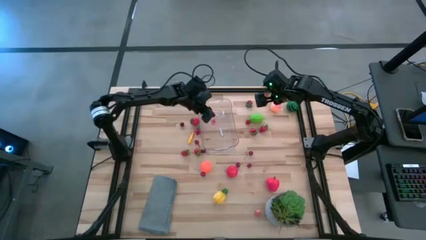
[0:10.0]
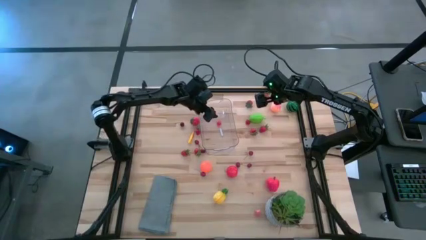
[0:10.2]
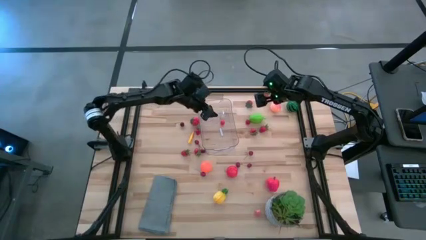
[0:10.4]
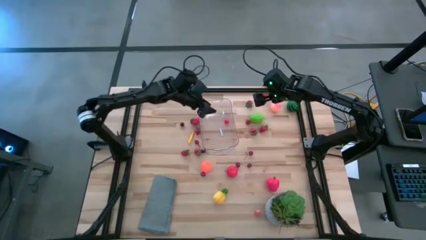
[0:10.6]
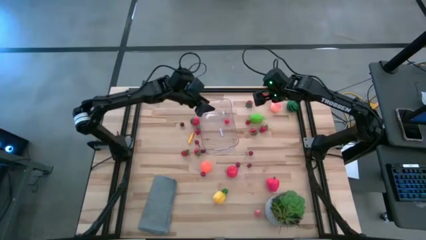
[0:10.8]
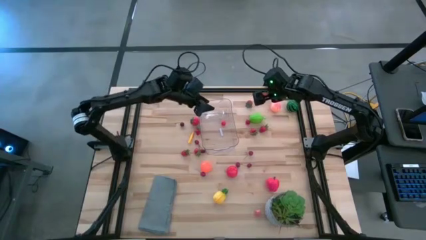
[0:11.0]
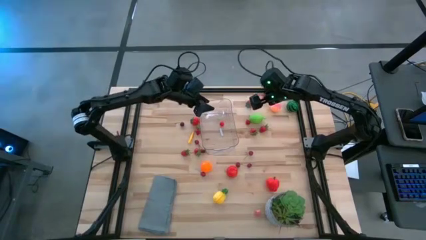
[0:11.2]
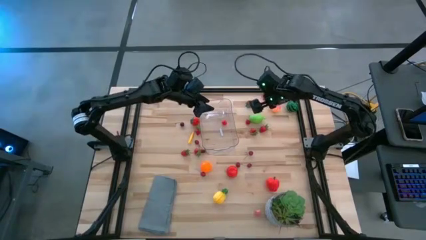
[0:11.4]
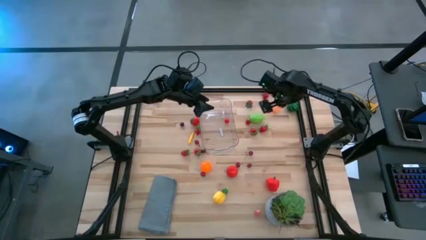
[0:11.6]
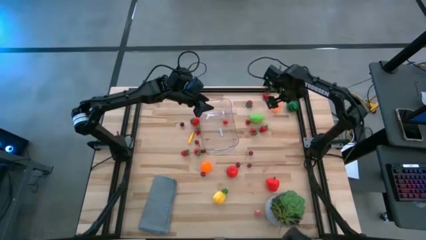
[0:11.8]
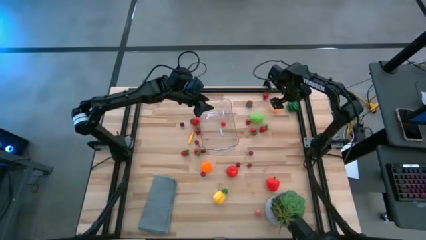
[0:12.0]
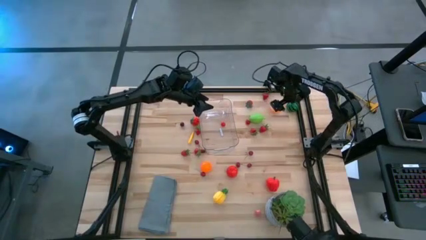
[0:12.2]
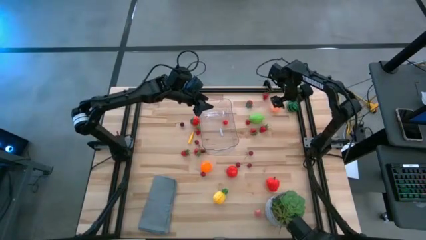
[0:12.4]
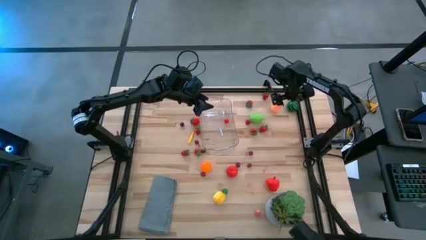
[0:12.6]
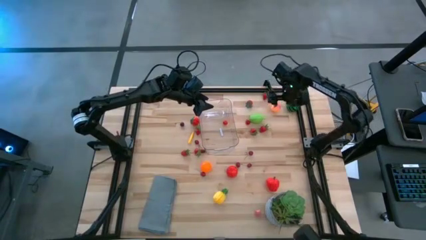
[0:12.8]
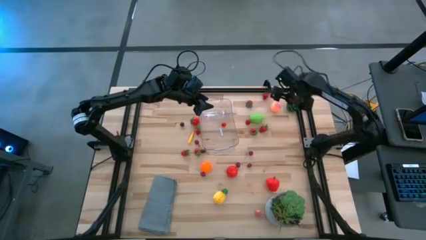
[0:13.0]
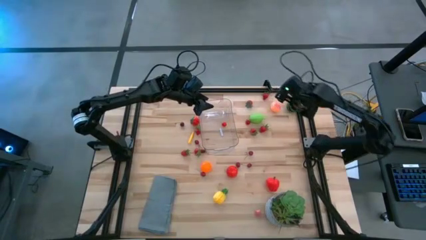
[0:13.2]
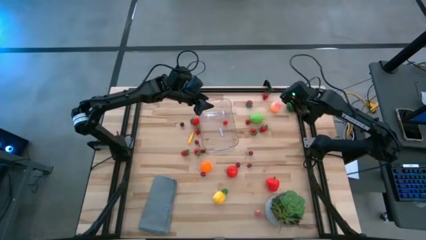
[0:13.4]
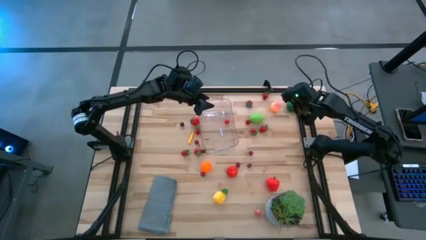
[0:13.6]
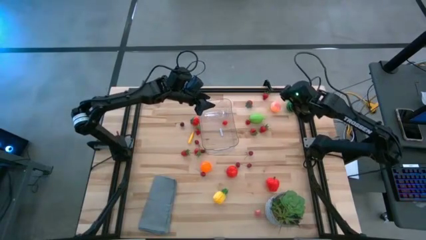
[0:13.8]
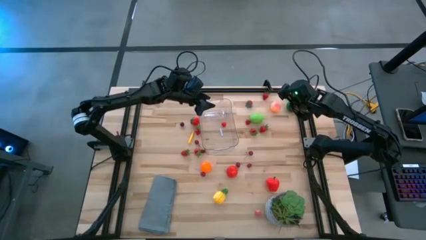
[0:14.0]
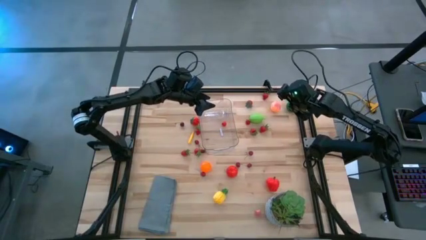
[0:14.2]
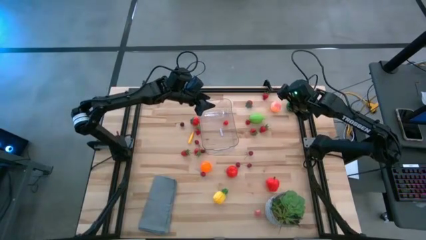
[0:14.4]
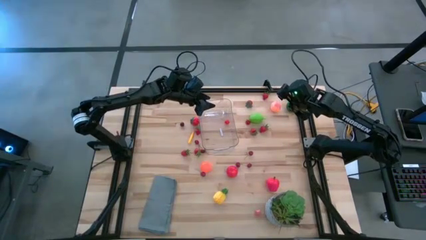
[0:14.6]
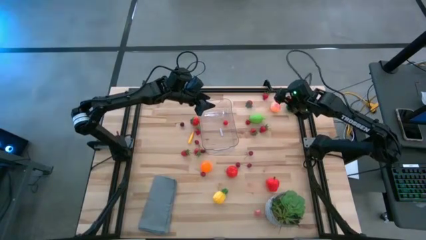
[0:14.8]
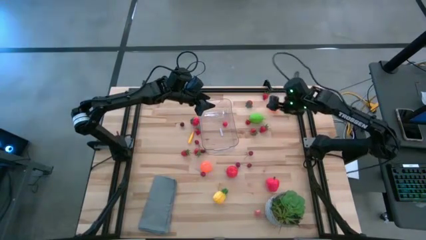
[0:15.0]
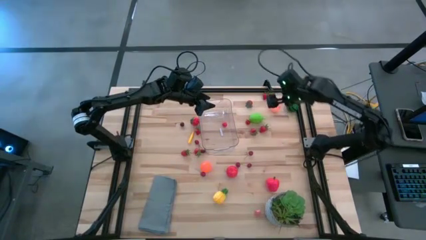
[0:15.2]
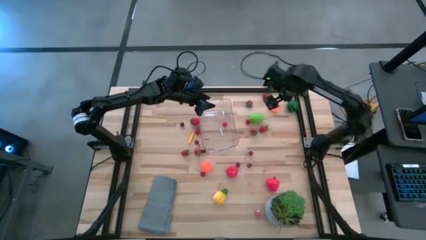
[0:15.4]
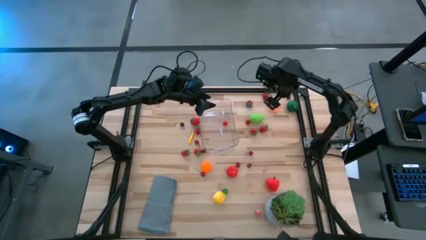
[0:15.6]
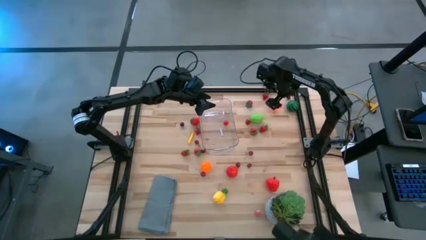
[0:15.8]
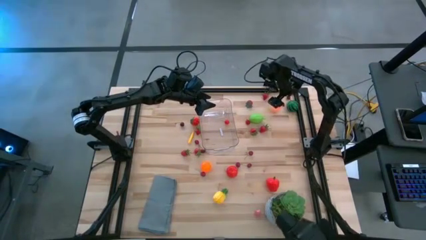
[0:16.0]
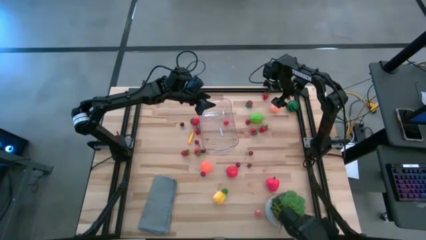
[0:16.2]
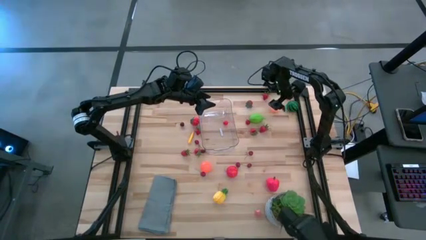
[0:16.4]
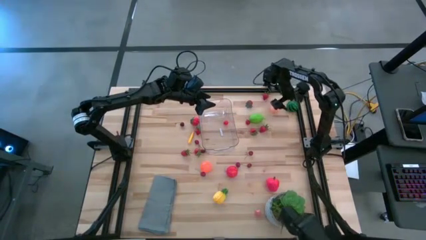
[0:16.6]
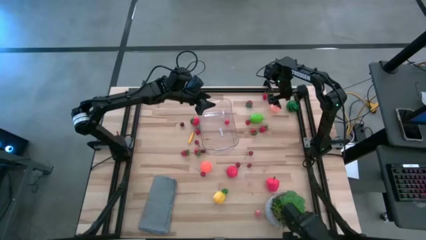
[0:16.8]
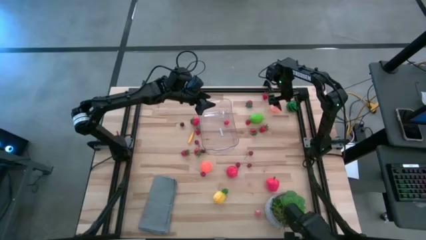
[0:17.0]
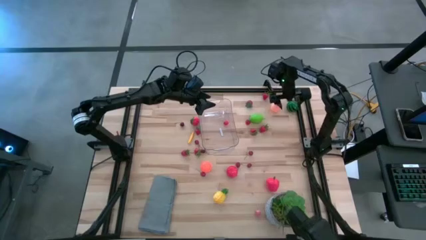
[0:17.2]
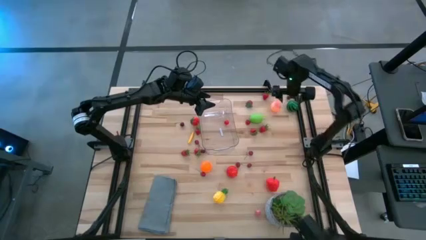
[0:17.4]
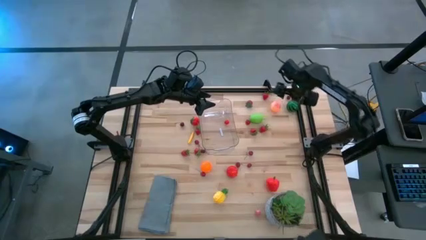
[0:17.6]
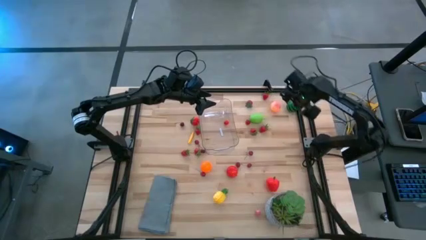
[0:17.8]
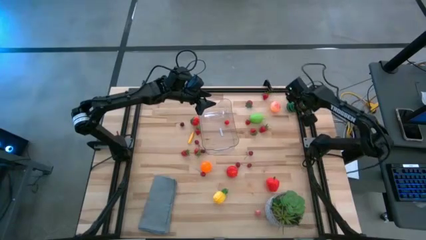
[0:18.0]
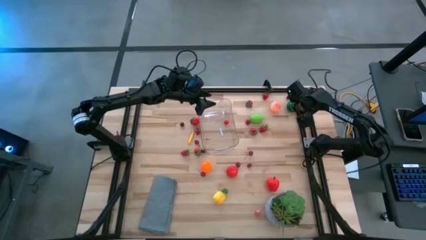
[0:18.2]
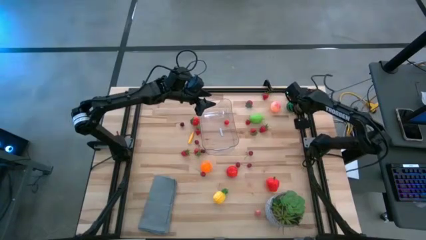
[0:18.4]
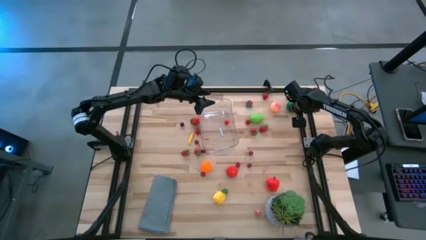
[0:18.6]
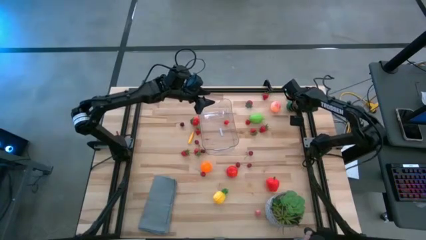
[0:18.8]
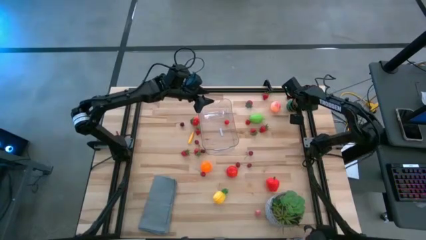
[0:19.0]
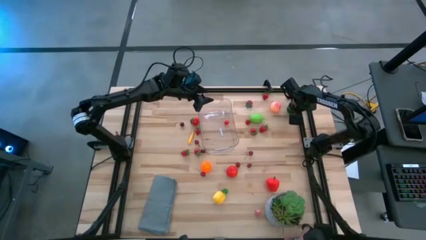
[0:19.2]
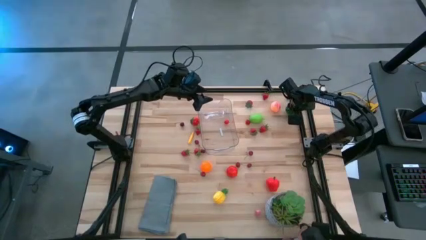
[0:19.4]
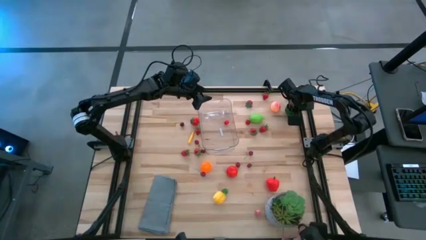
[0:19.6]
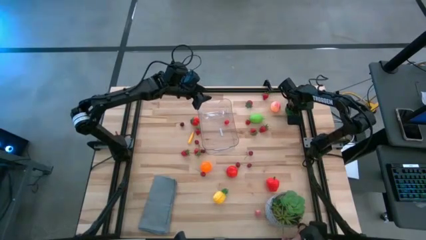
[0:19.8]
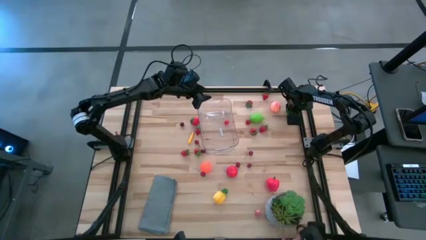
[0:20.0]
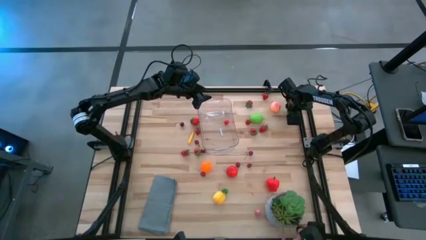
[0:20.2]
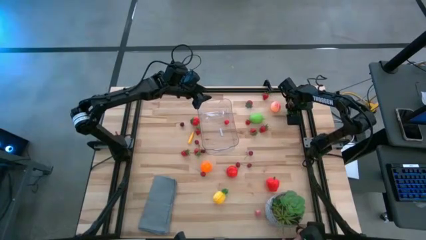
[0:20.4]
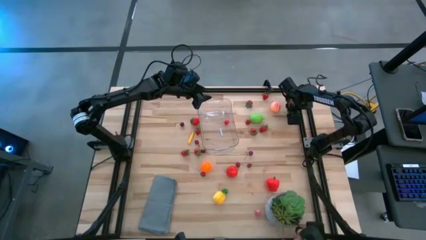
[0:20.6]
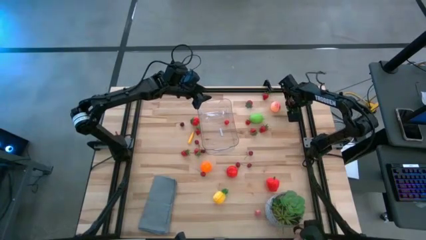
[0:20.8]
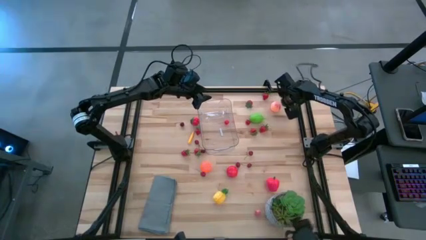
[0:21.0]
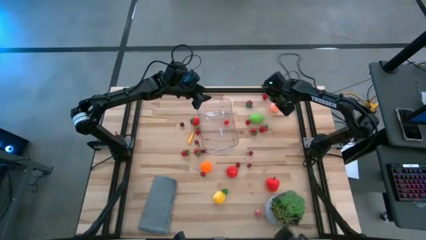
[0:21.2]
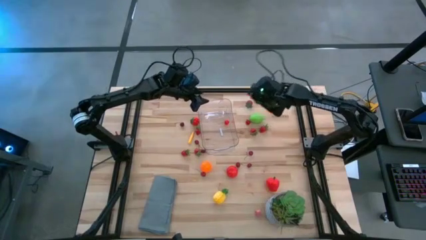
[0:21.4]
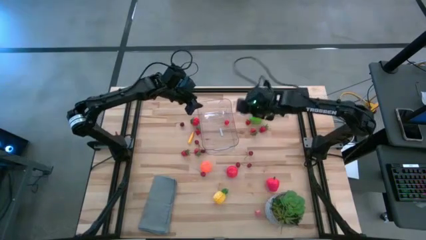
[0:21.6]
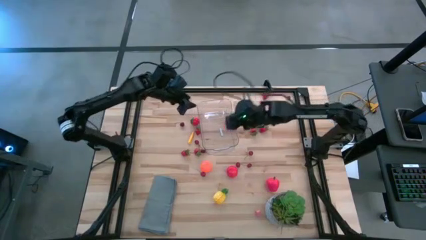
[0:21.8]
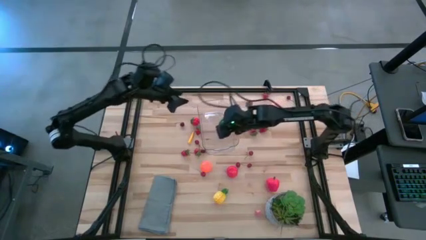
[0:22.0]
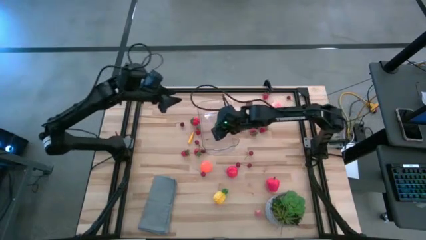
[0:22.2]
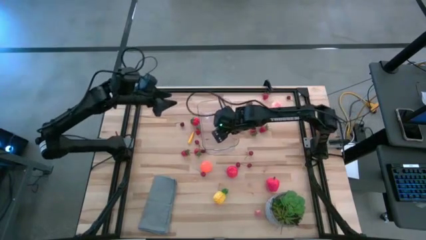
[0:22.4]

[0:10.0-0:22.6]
Task: Pick and placing Produce into tupperware
Put the green watermelon into the transparent container

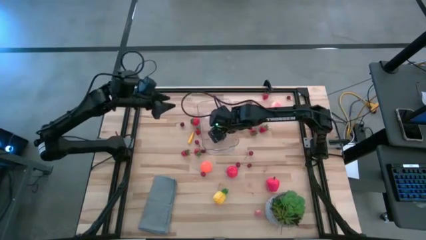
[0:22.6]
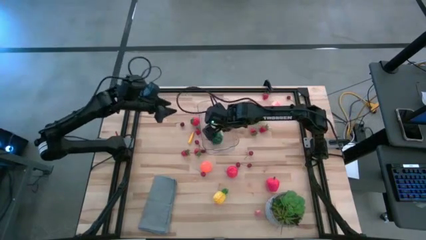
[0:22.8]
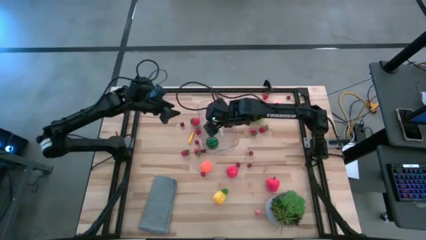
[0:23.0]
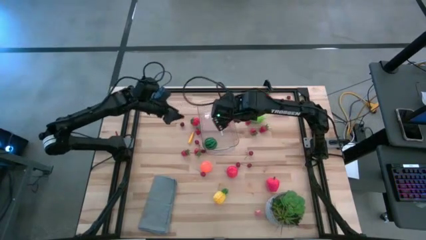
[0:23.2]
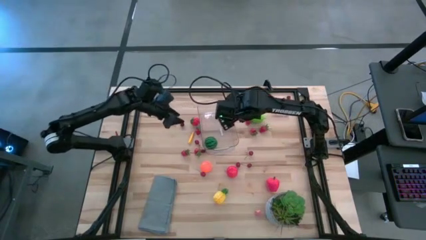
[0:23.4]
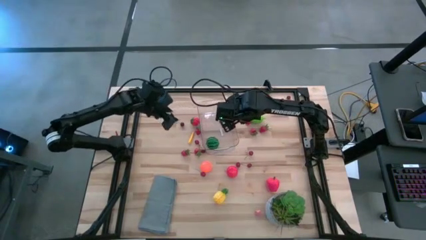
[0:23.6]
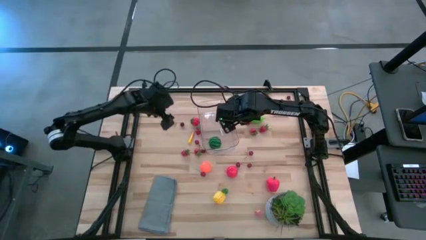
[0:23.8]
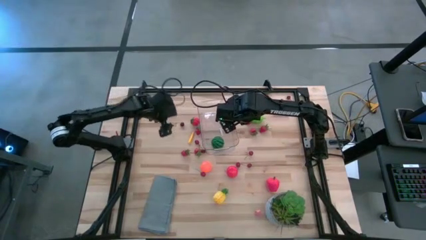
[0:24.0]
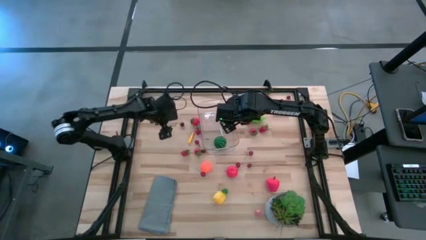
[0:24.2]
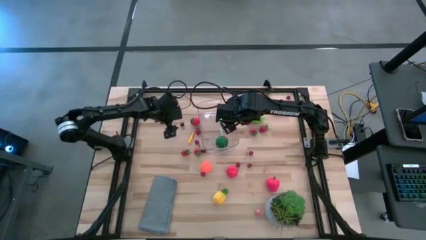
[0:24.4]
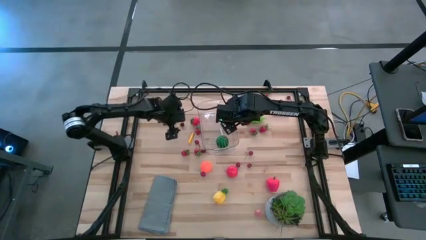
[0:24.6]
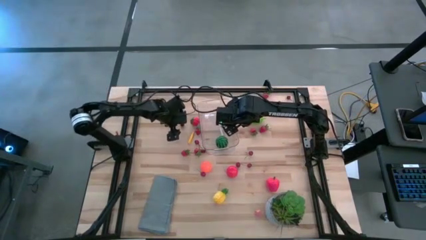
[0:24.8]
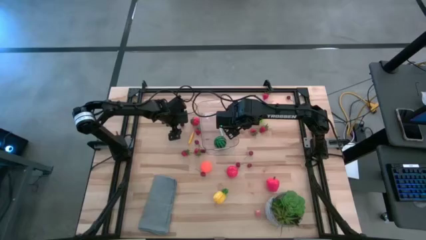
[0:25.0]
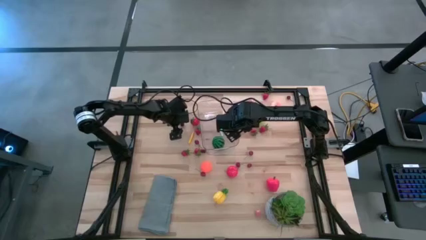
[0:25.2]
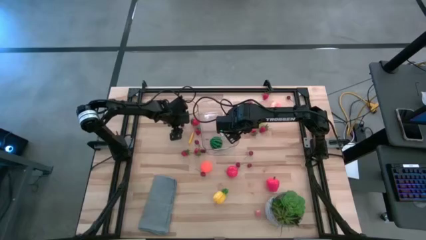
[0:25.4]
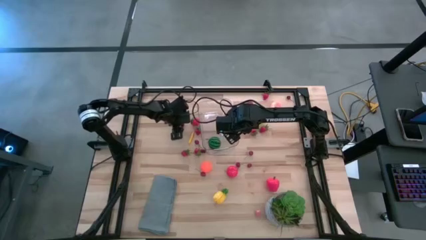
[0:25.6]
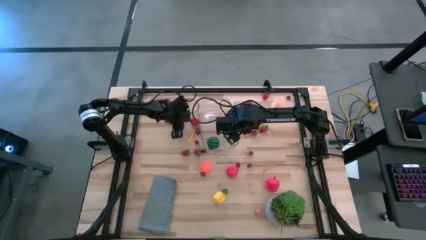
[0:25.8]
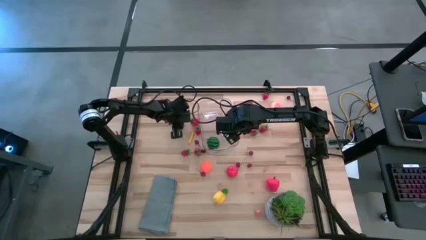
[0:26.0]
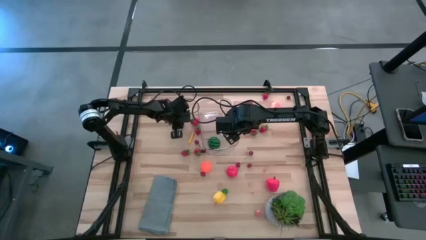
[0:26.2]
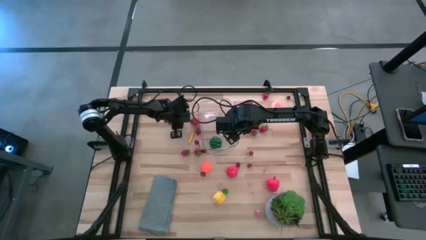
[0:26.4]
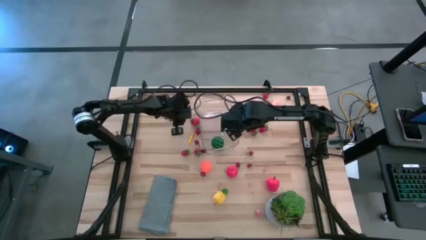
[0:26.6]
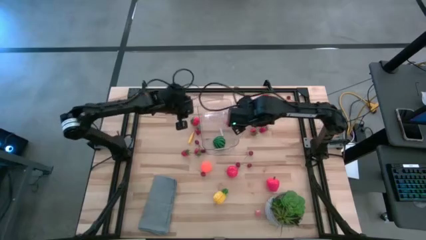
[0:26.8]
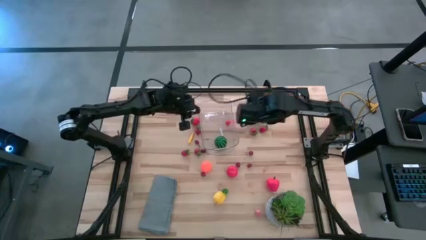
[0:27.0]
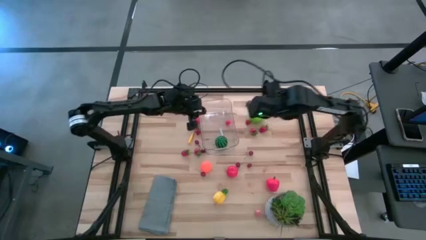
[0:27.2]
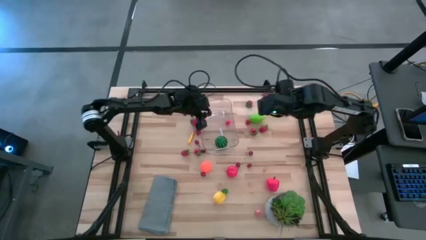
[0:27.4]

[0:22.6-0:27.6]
Put the red cherry into the transparent container
